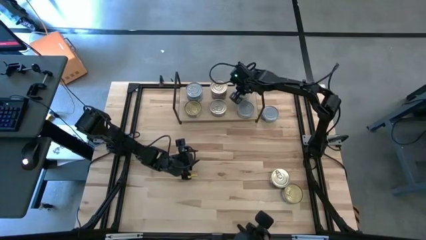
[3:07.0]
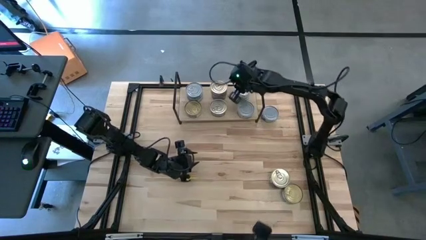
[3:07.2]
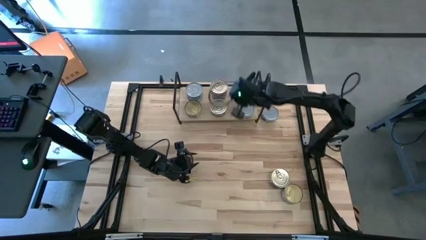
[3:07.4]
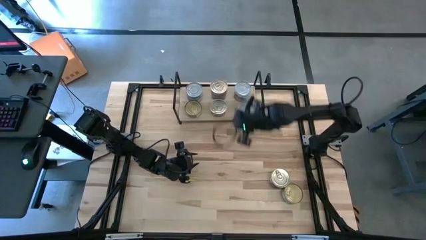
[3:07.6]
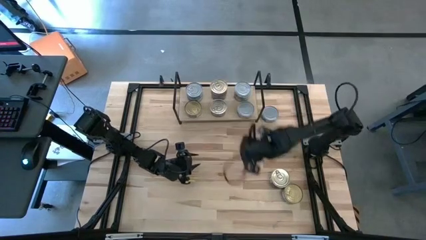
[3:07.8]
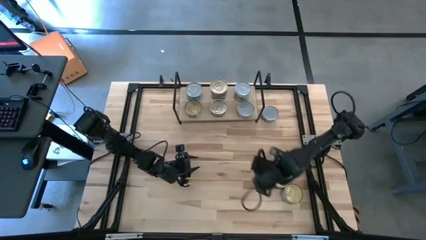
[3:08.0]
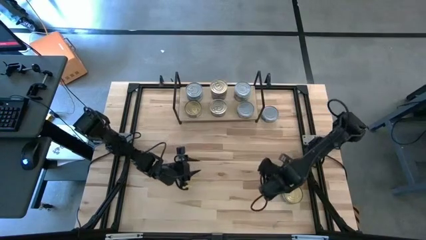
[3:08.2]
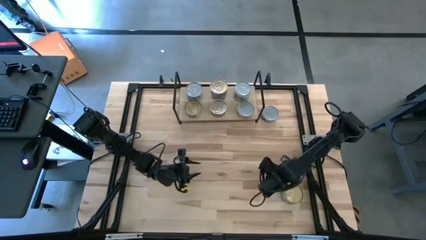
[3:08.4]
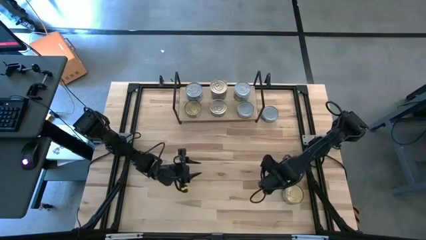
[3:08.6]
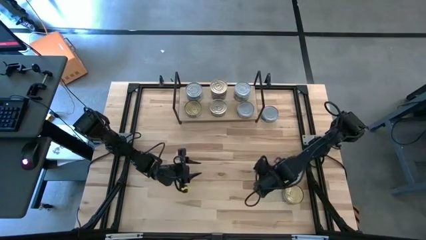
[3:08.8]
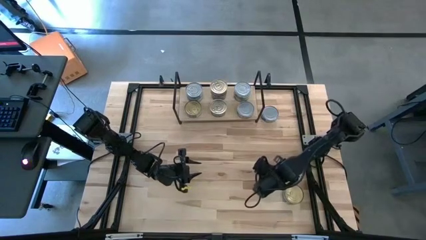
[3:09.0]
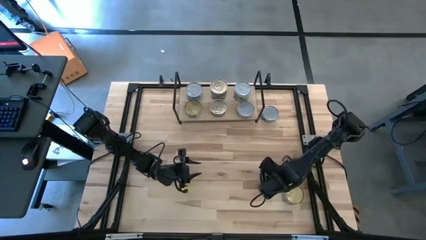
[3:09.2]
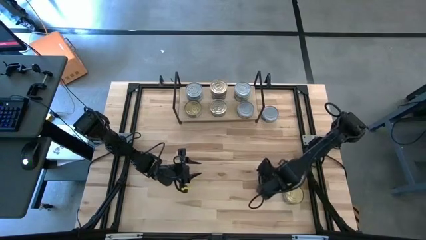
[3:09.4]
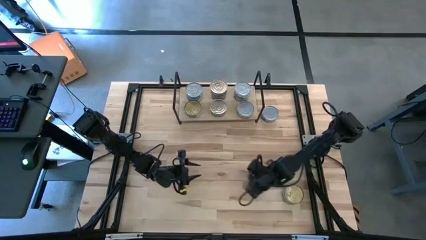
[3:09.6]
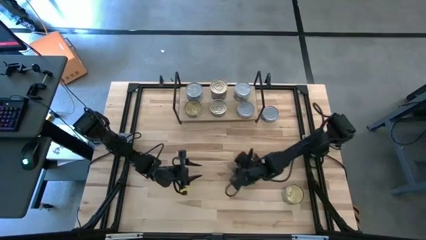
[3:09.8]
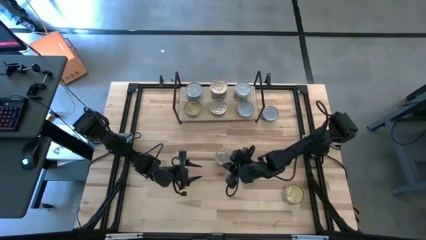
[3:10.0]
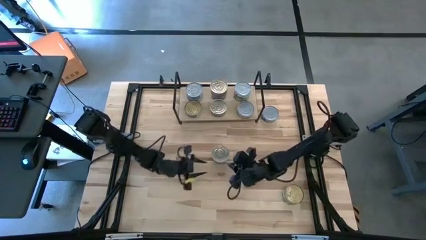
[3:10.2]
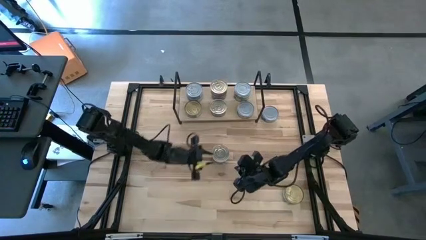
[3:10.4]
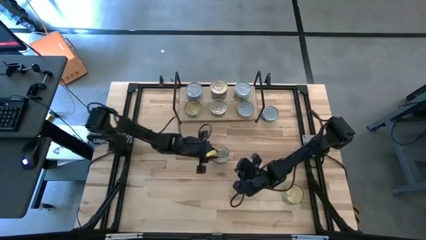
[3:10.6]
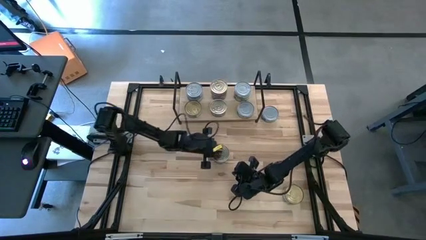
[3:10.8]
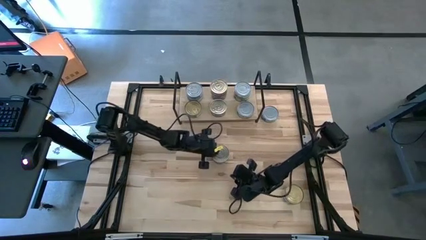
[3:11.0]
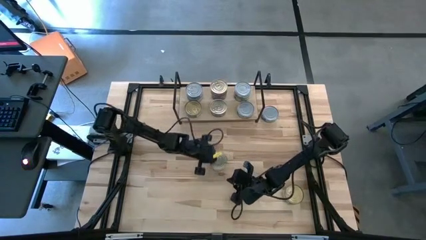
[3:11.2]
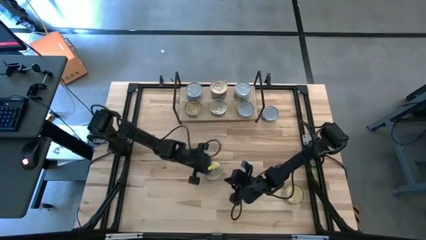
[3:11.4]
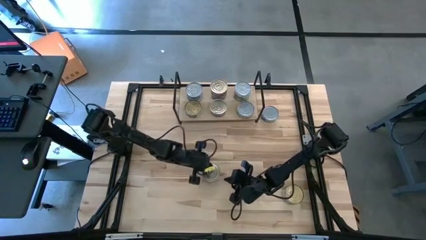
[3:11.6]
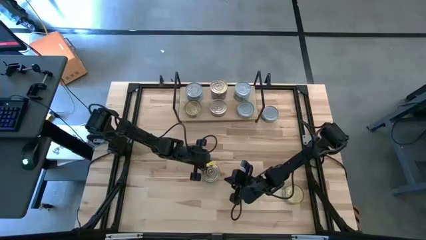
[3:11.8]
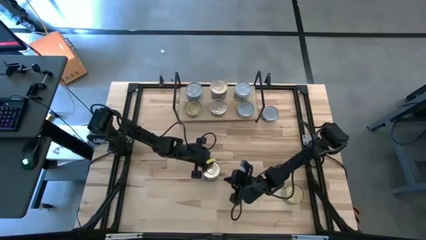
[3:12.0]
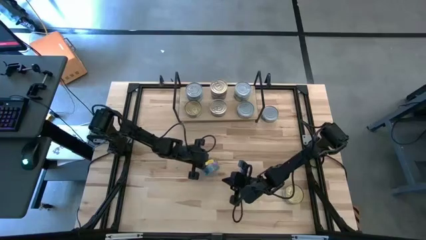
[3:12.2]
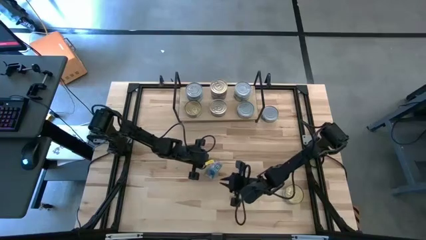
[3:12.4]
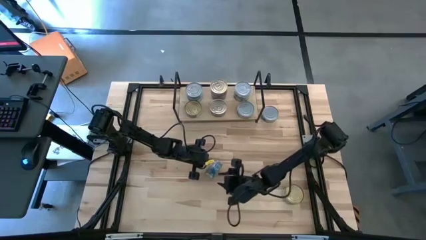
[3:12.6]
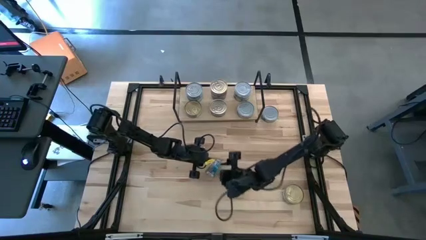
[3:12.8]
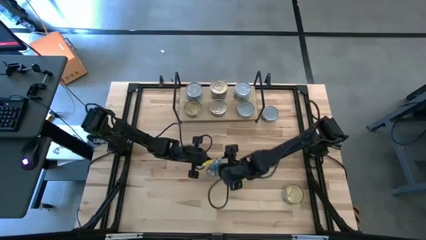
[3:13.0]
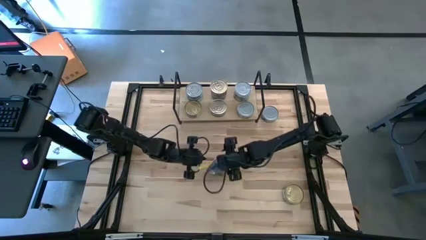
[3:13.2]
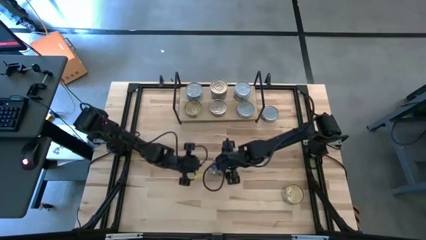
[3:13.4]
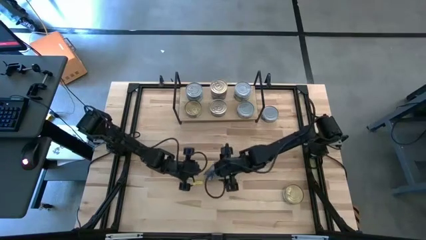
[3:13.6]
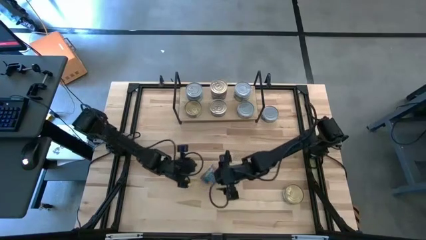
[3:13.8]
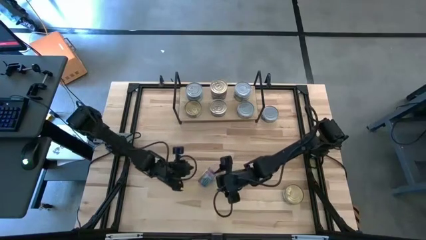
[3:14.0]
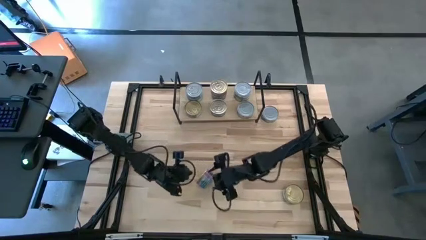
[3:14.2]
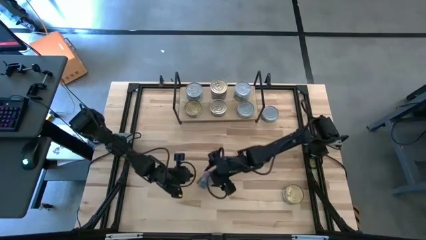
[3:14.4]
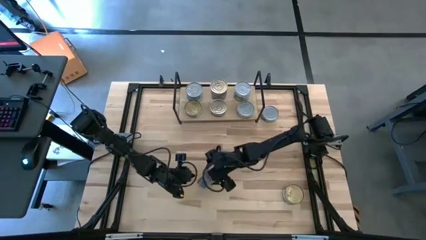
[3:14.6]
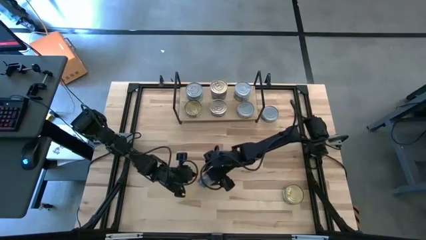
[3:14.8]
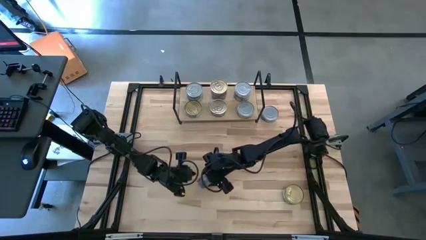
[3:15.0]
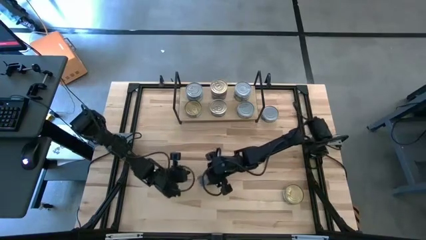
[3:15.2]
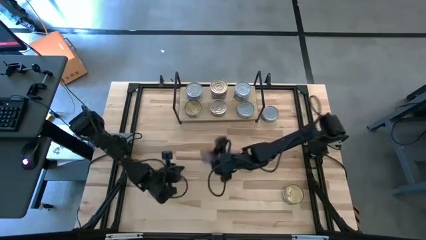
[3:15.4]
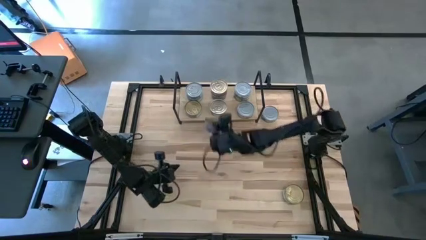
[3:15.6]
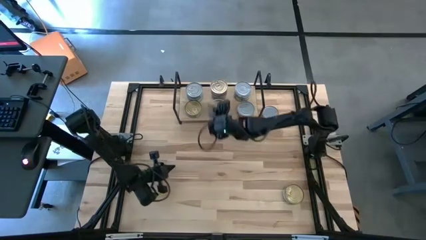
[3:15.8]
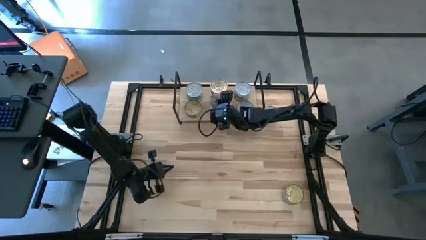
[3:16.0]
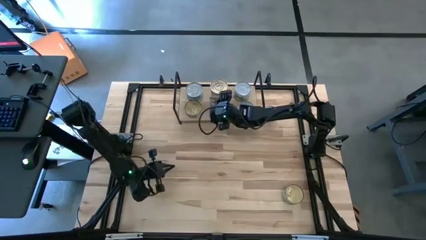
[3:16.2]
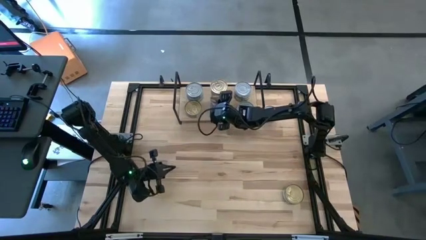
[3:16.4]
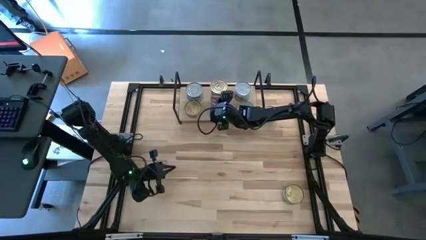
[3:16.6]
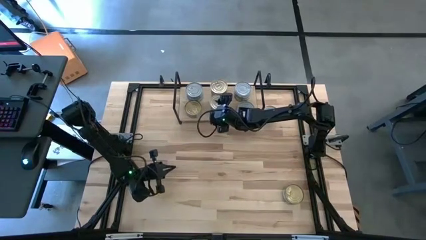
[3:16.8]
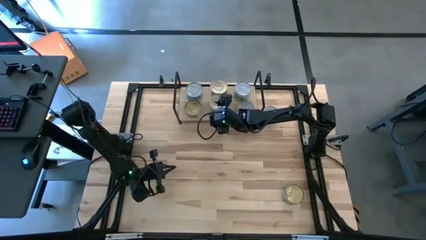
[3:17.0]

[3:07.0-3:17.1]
Task: Stack canned seafood by type on shelf
Stack the blue tuna can on top of the blue tuna can on the back of the shelf

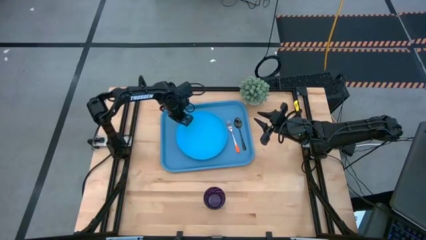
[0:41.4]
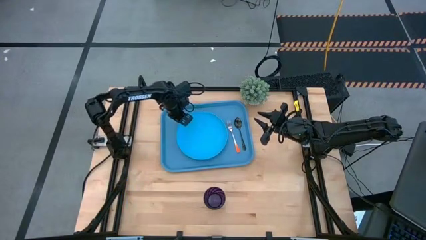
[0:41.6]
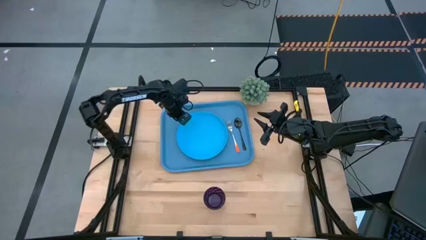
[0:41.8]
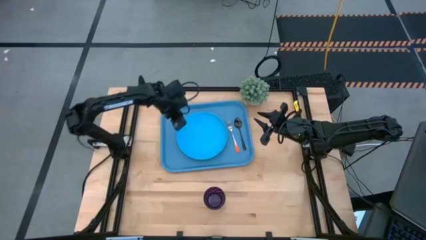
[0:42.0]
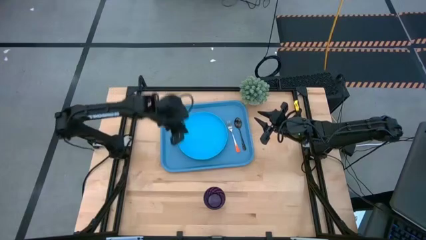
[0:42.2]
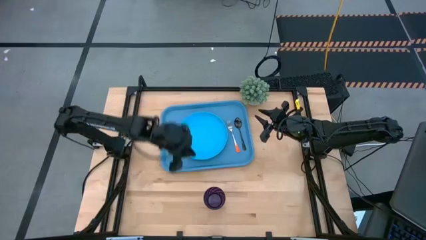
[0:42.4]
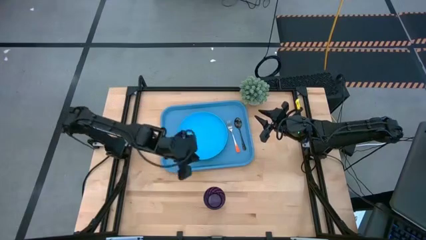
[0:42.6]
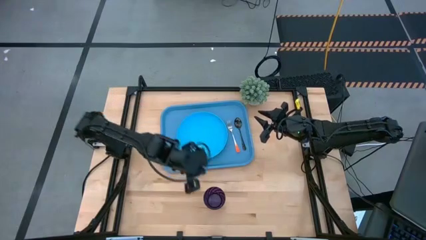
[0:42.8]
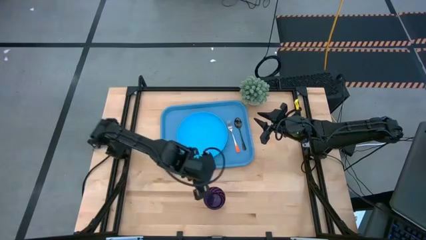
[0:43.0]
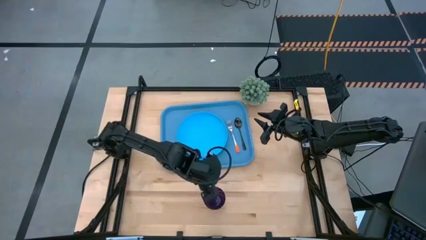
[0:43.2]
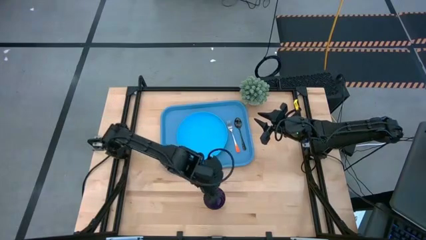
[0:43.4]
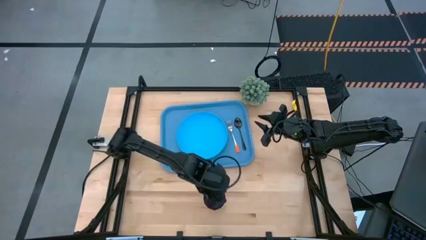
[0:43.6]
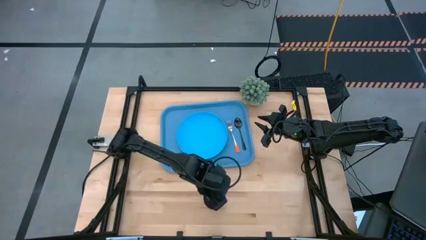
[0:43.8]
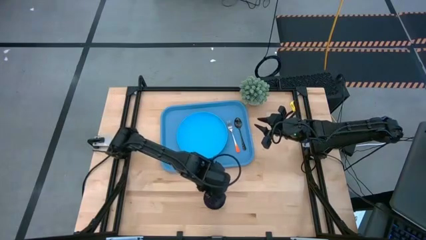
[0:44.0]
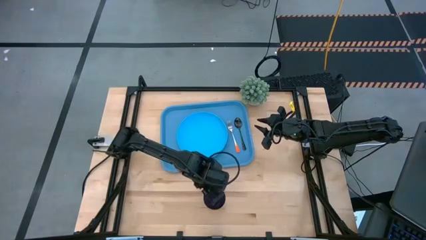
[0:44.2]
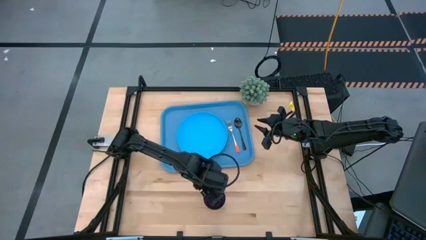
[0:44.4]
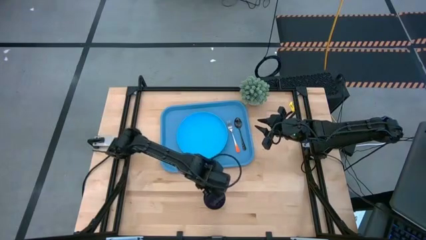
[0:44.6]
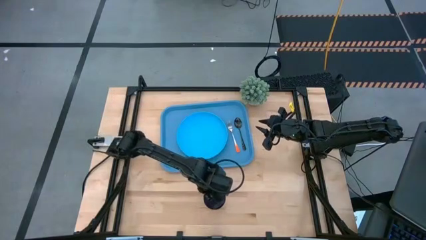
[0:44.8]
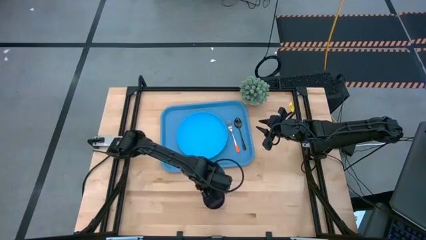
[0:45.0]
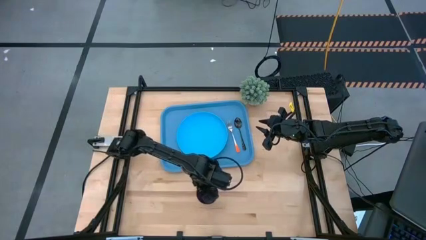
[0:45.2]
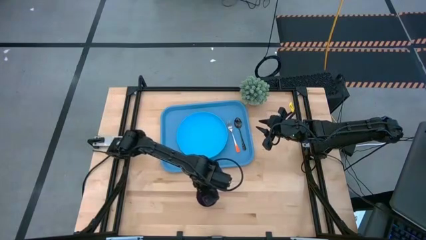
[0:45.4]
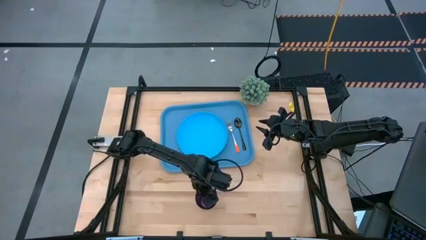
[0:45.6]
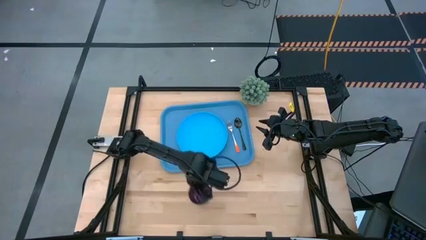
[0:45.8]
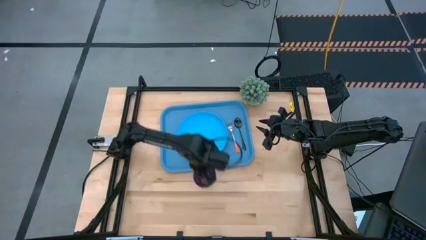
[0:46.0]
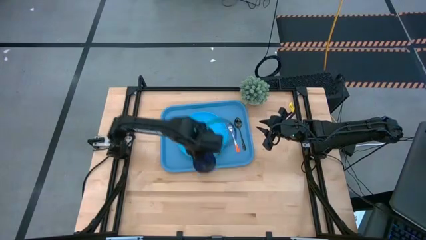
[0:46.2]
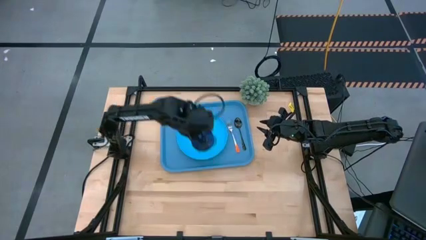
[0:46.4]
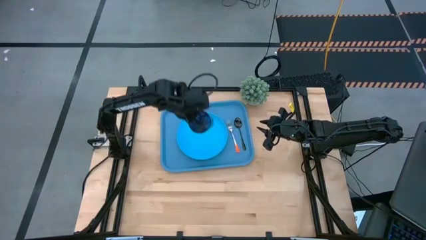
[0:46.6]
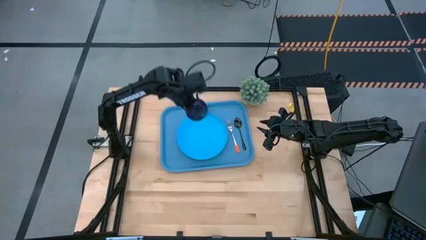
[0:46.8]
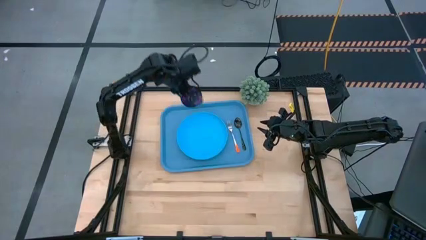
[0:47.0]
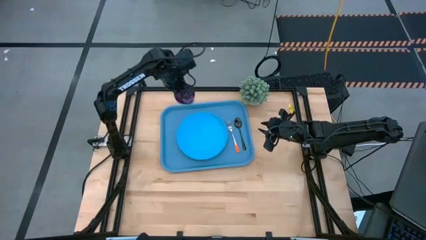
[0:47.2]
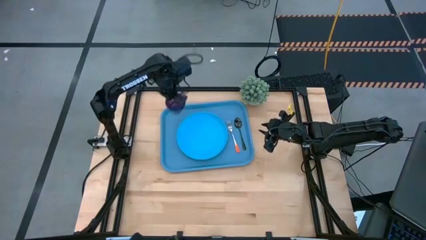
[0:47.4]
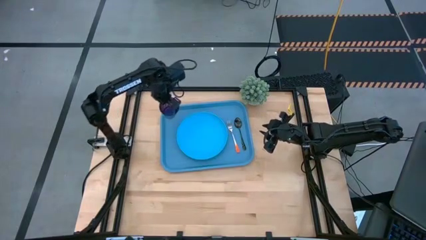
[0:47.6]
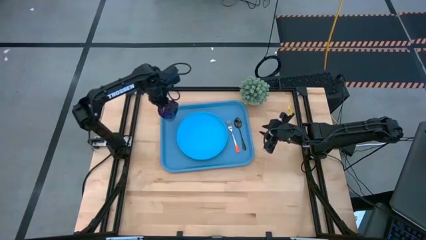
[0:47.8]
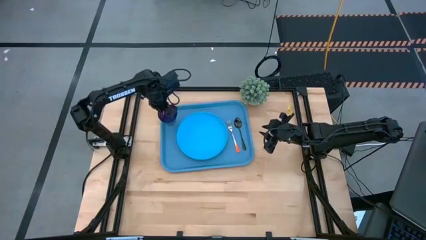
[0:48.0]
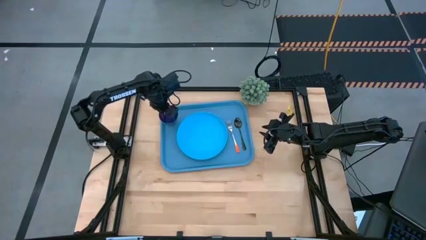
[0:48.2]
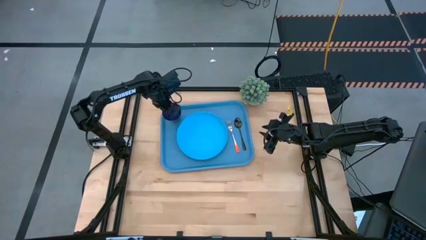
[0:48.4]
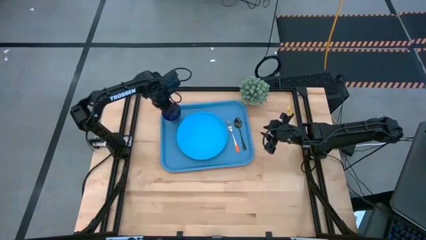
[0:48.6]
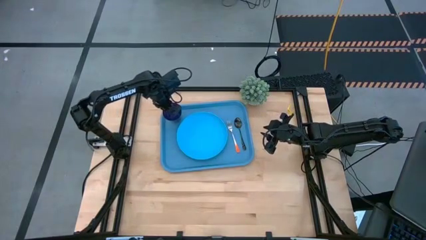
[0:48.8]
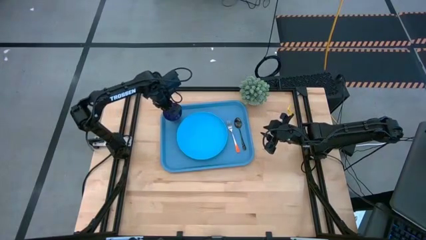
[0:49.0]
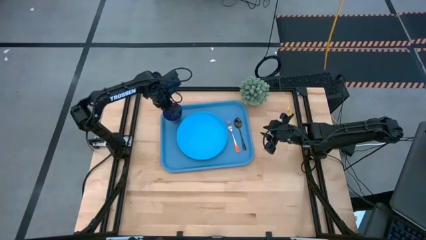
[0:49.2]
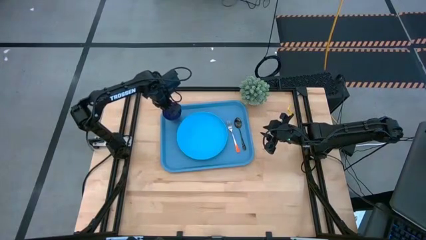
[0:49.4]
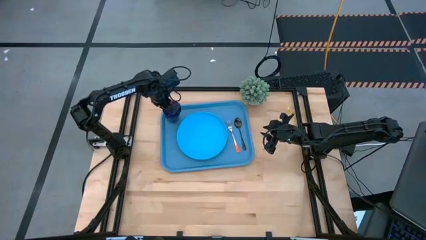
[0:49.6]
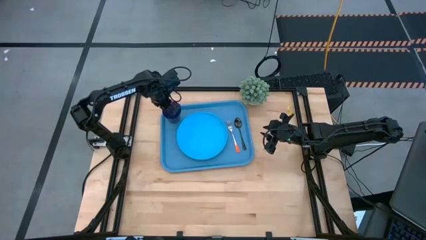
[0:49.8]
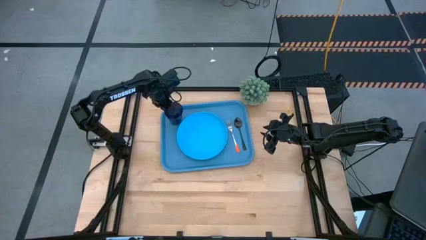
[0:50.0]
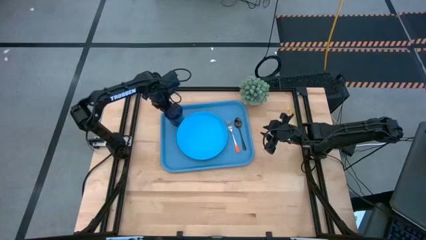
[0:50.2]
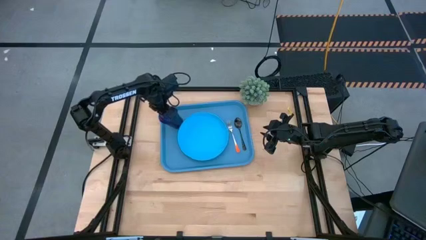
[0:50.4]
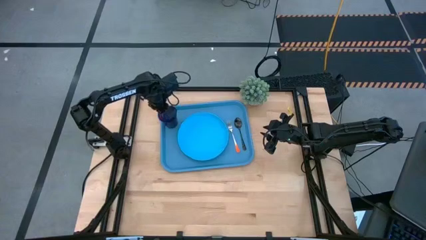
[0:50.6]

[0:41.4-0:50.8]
Task: Pick and place plate/cup/fork/spoon on tray
Put the violet cup on the blue tray
